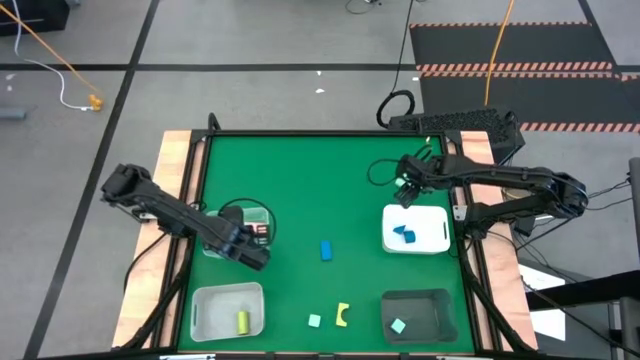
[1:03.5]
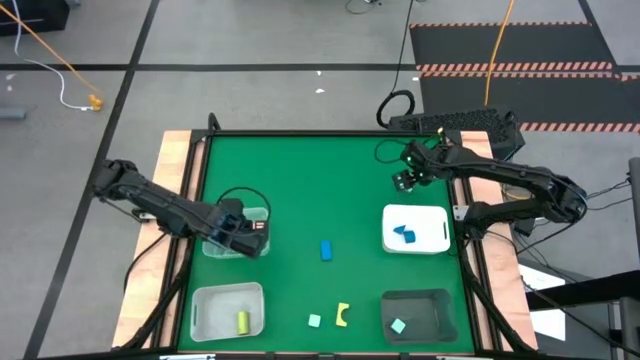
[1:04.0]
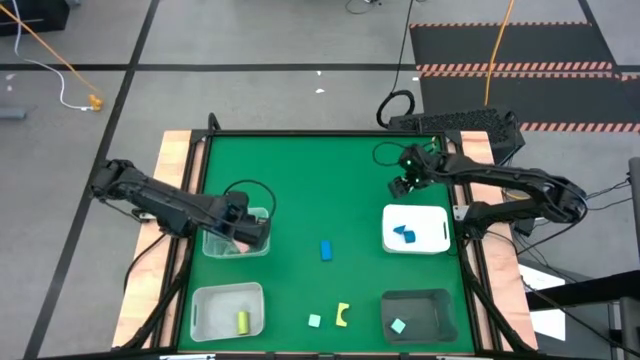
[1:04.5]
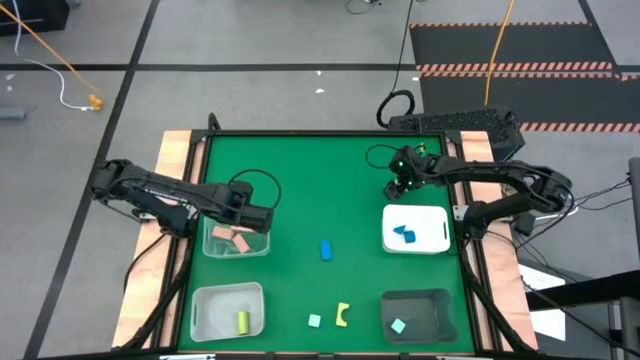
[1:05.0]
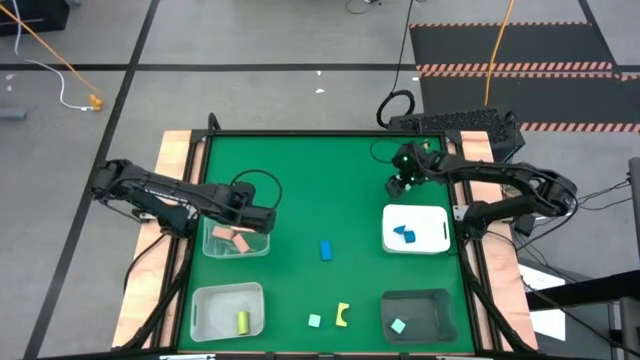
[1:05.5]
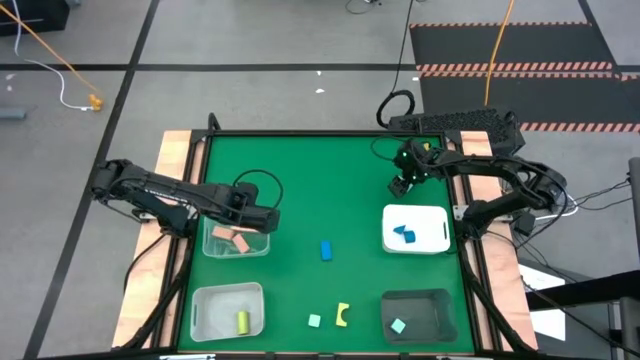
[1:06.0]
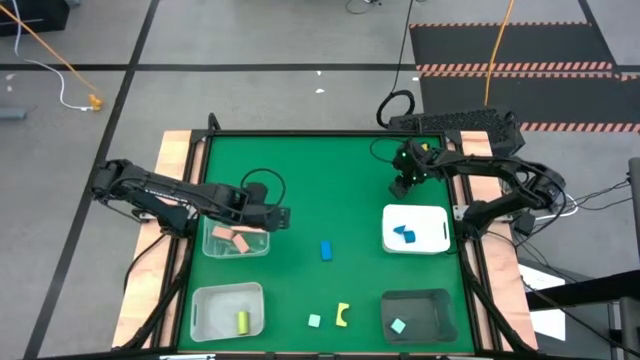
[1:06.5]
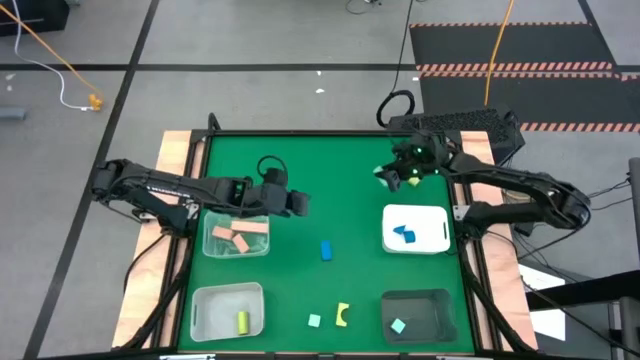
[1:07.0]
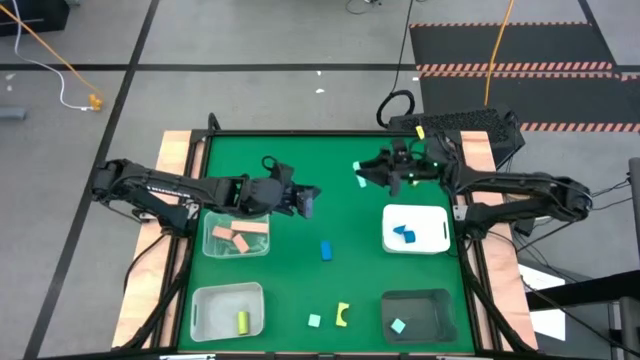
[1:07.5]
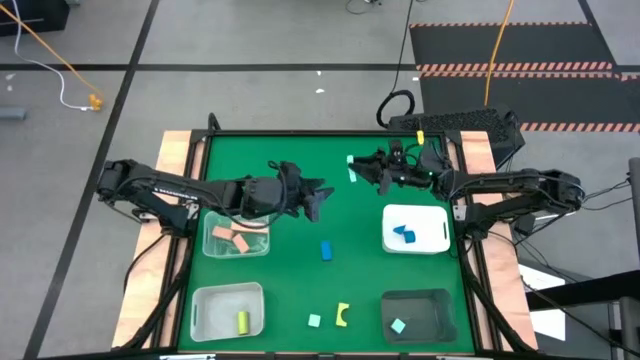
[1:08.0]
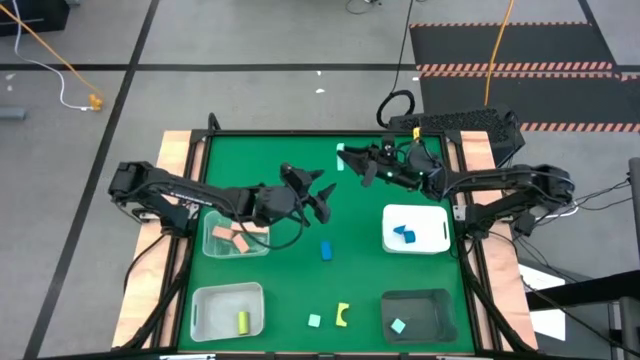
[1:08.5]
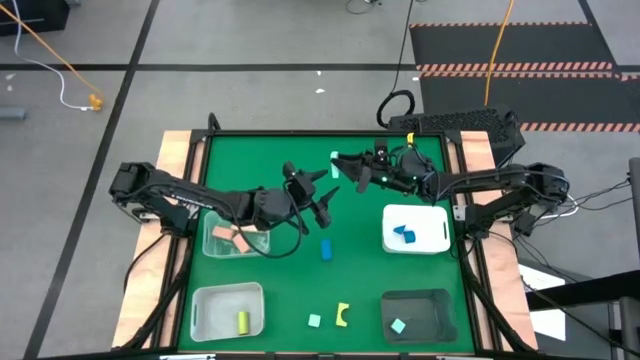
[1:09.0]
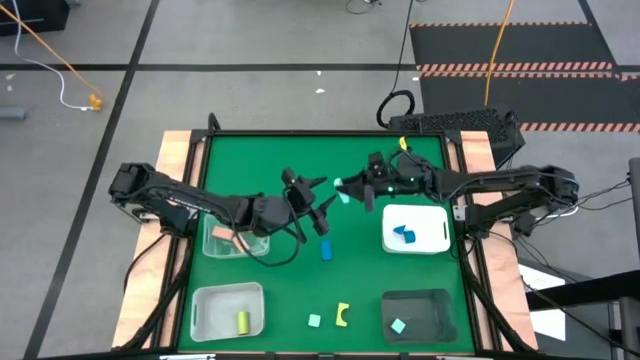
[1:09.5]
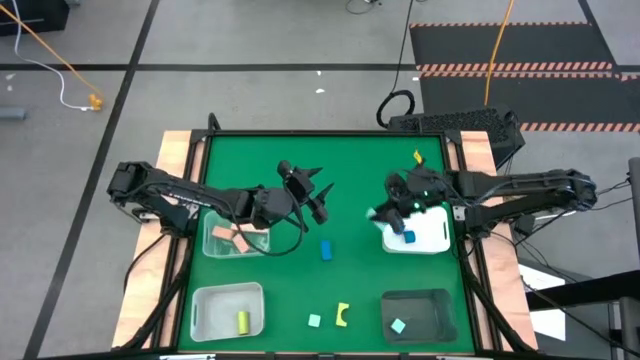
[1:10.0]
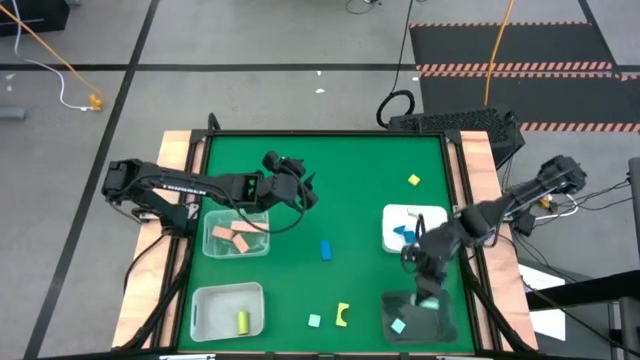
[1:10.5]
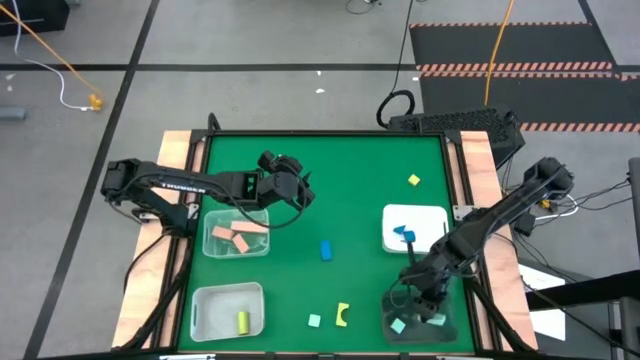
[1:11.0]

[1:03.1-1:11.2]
Task: Sort & place blocks by color
Put the top right light blue block into the black bin

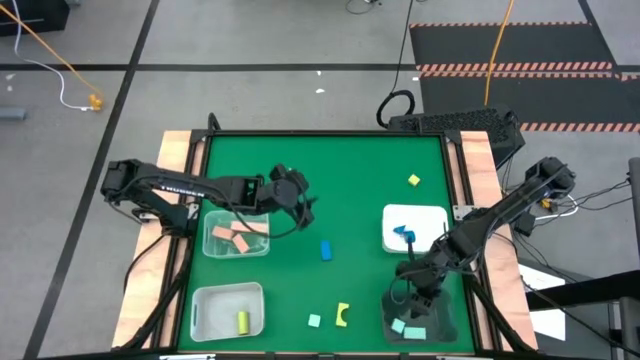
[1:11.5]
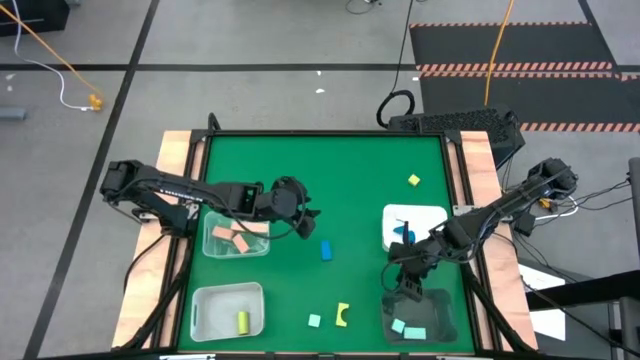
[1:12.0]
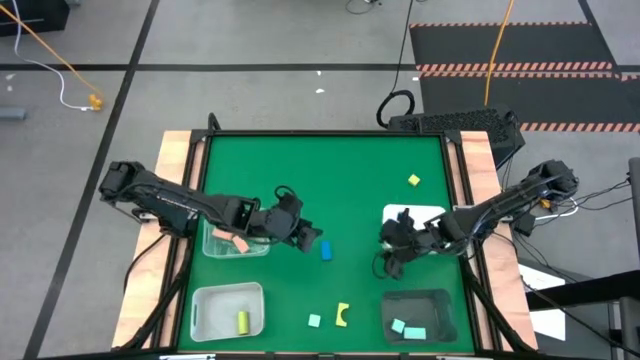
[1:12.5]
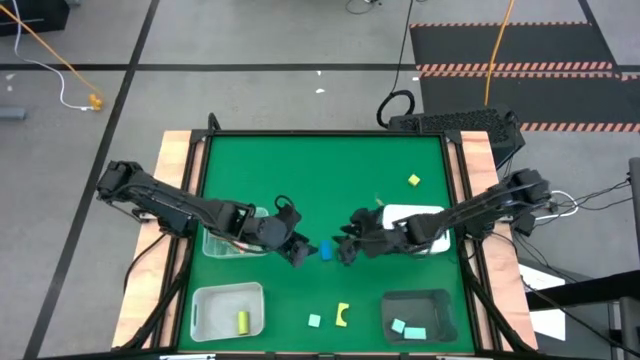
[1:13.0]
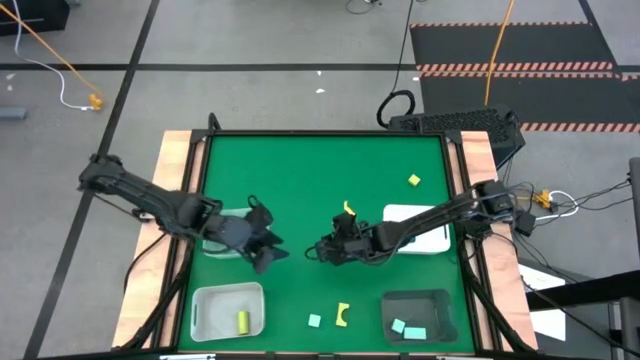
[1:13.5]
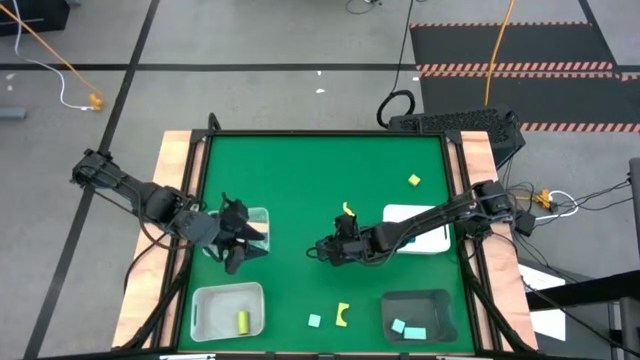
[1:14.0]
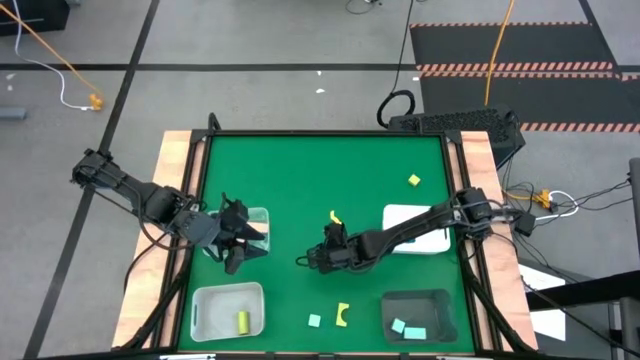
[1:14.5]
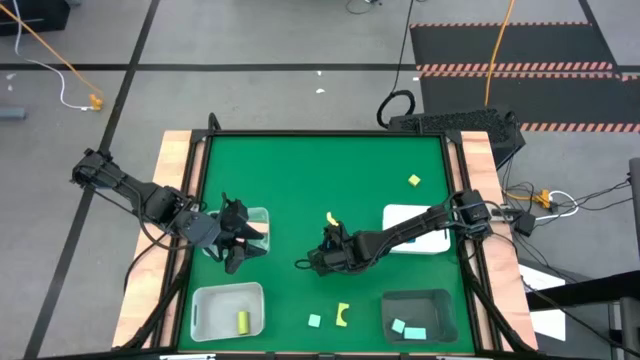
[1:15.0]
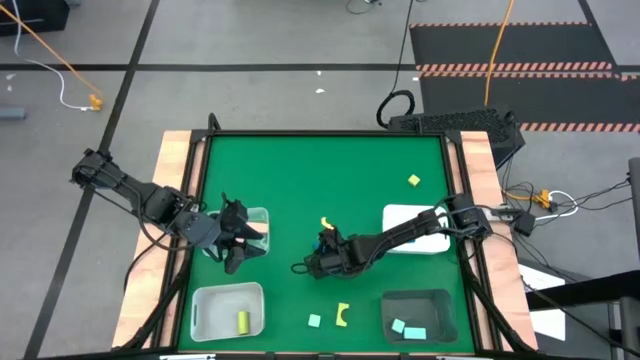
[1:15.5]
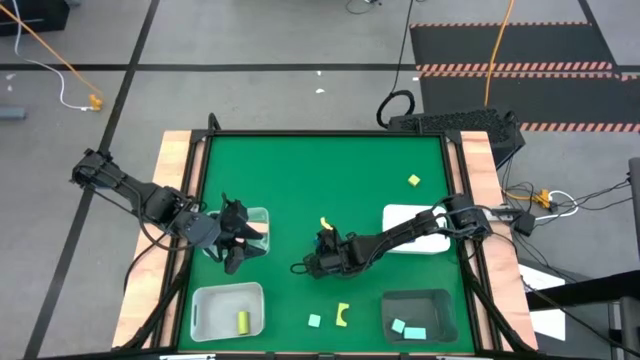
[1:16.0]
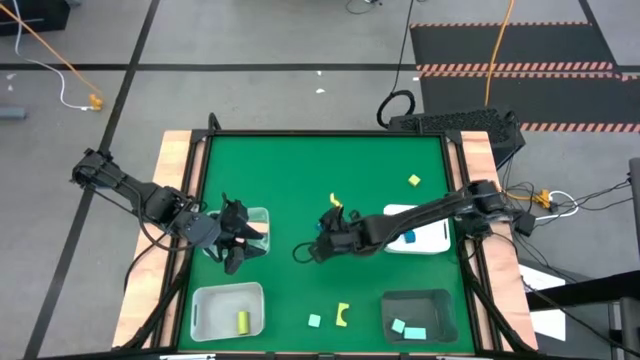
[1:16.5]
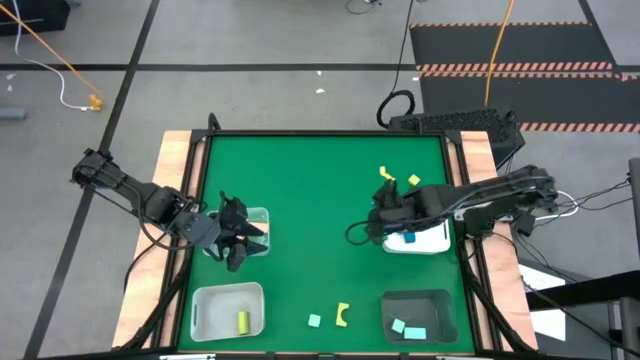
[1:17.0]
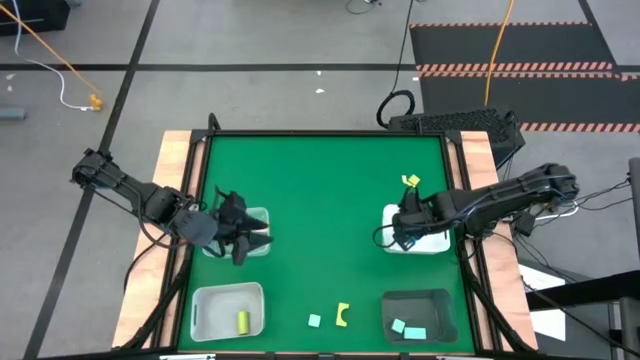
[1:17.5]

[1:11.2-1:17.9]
Put the blue block into the white bin

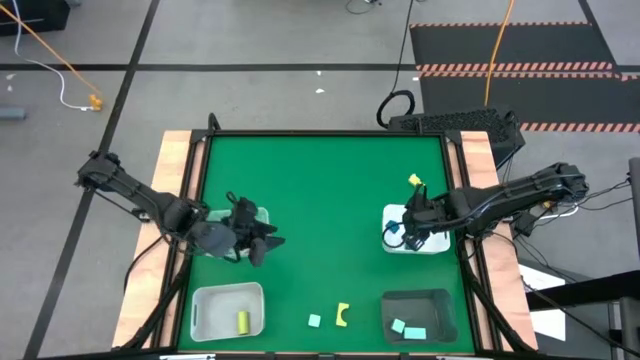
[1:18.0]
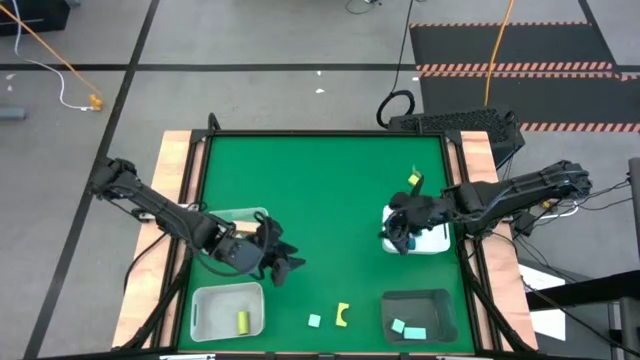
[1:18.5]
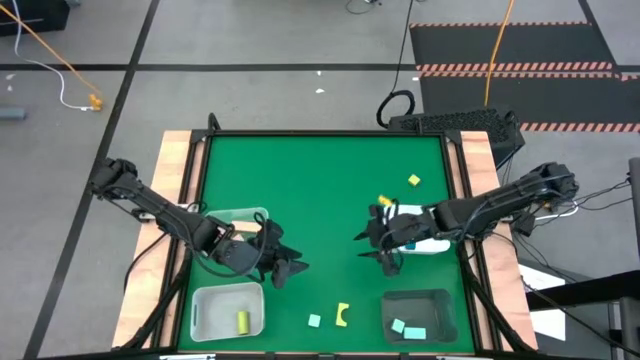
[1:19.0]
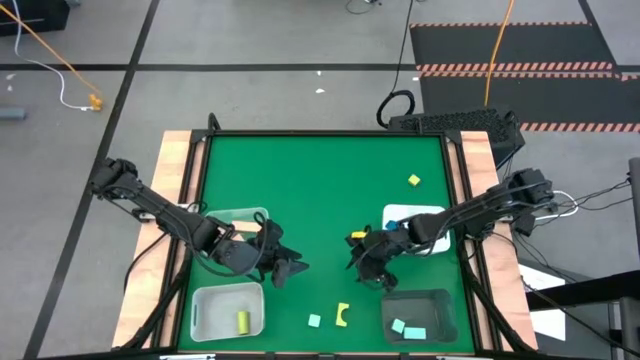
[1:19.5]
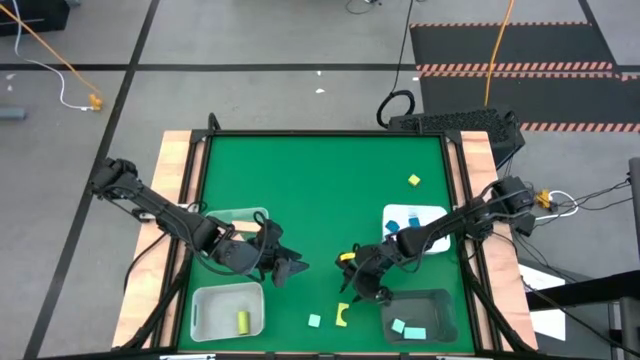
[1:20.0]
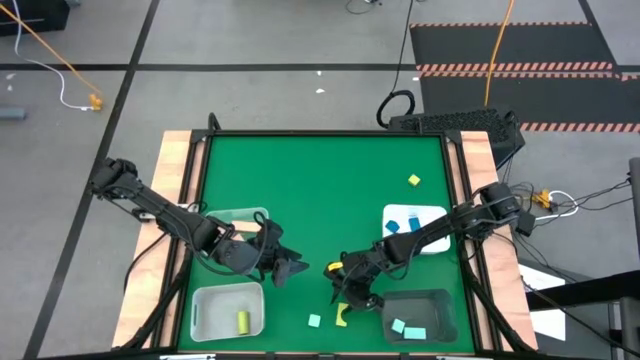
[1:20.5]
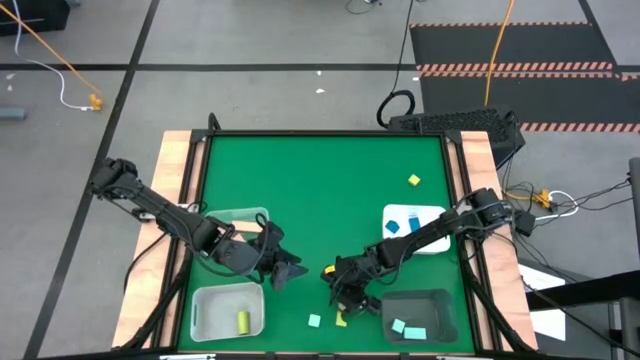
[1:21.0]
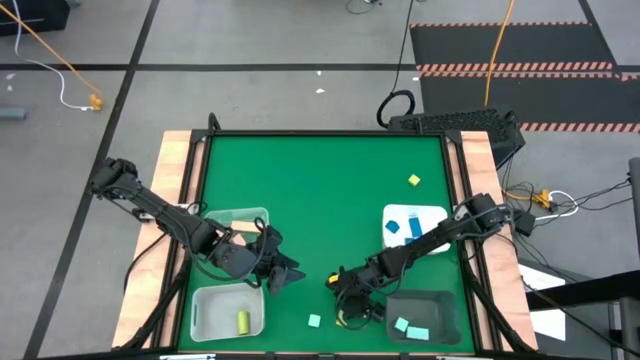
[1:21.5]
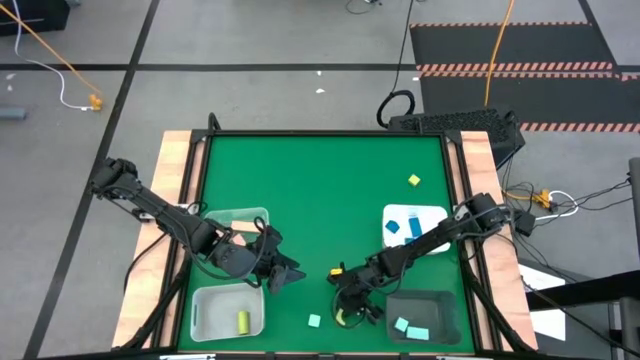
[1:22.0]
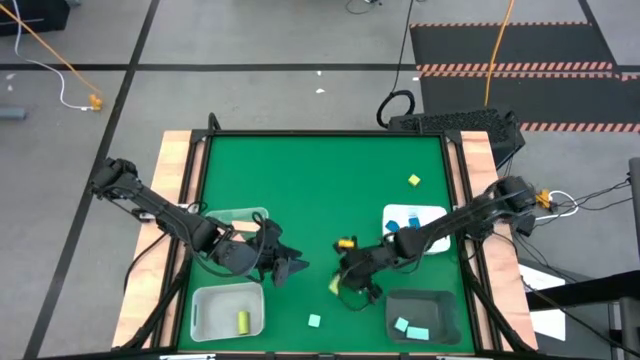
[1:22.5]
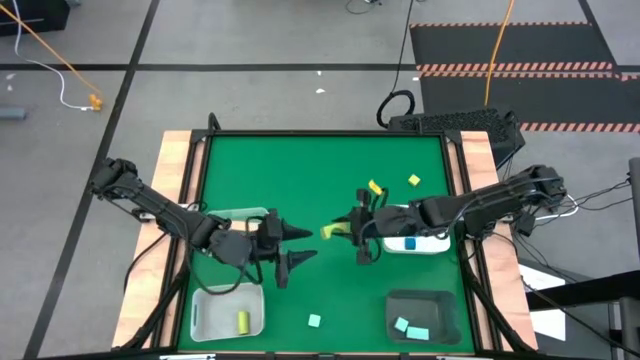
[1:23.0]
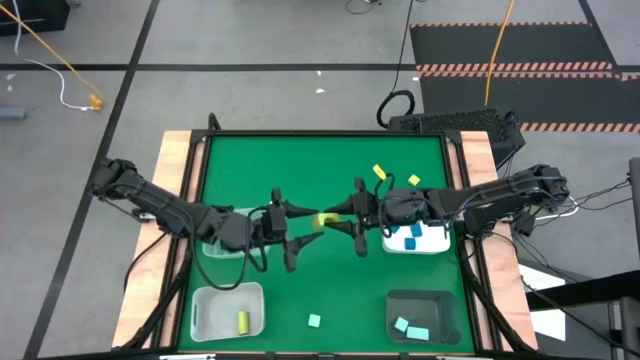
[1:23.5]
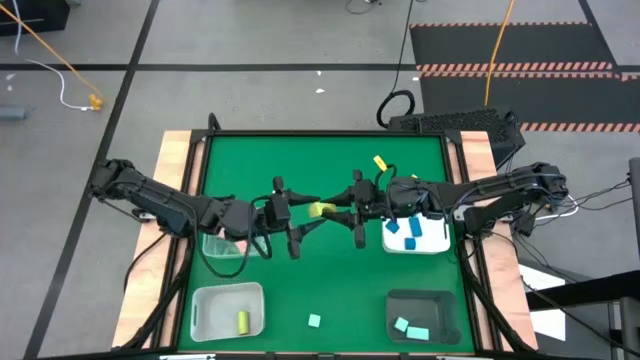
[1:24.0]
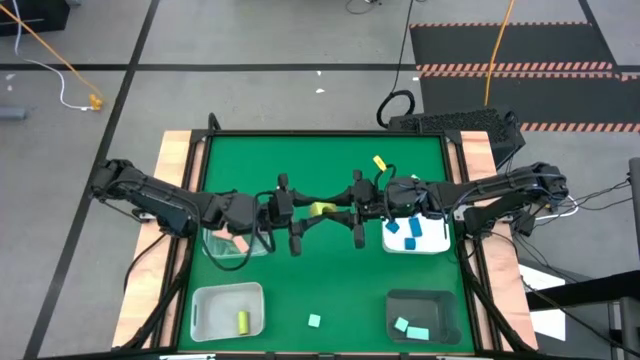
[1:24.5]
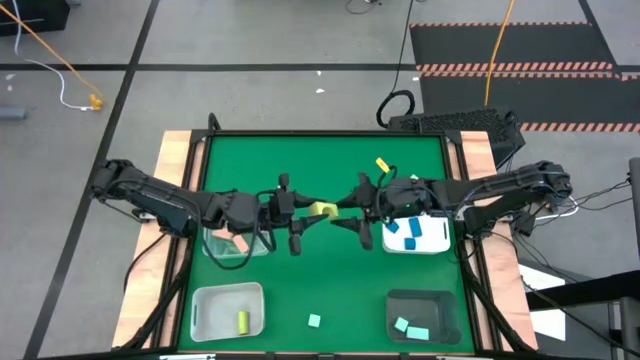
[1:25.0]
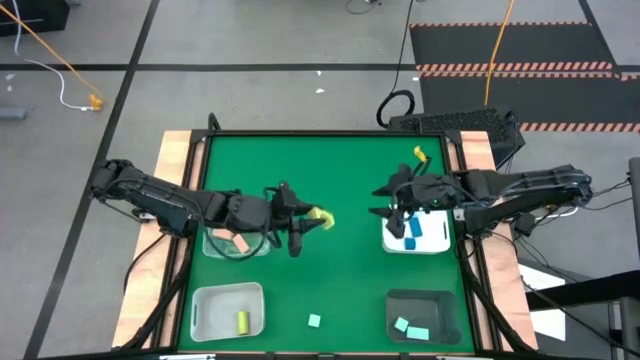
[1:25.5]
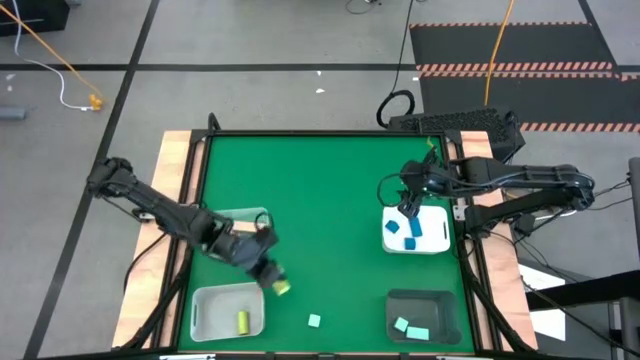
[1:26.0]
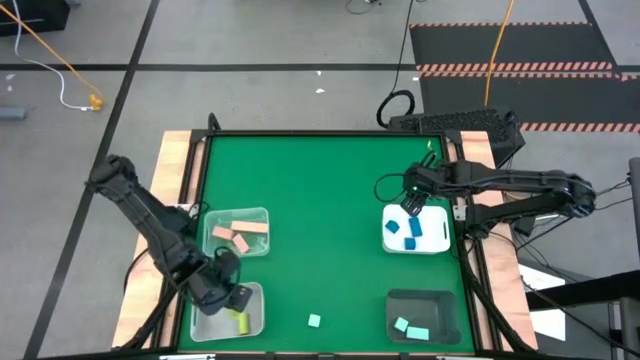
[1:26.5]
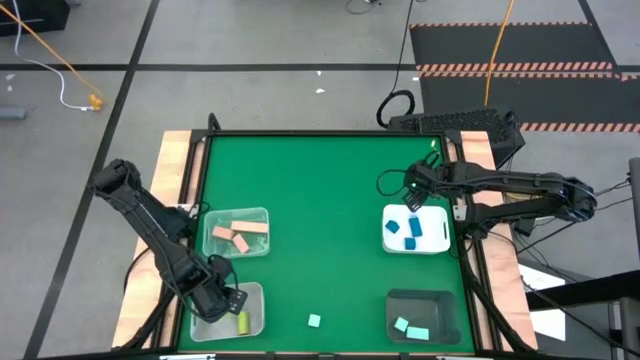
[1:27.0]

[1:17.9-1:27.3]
Put the bottom middle yellow block into the gray bin
